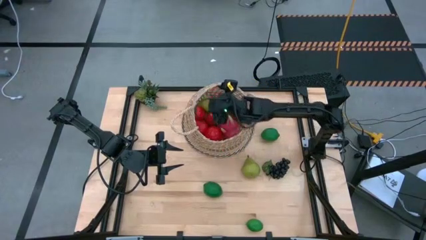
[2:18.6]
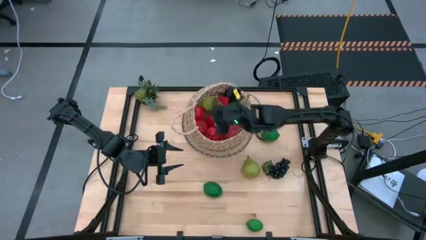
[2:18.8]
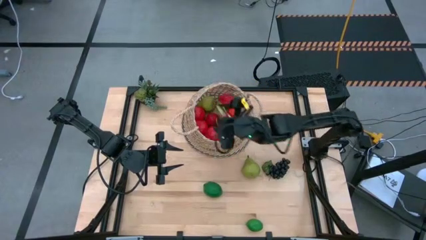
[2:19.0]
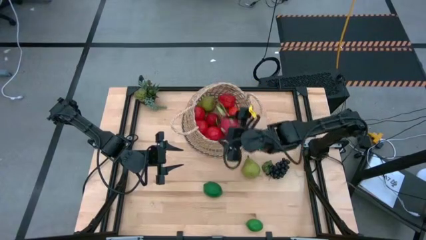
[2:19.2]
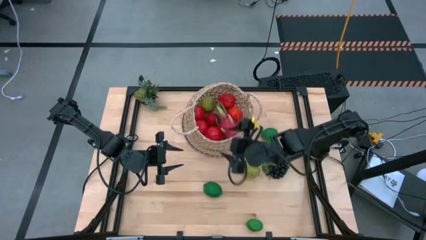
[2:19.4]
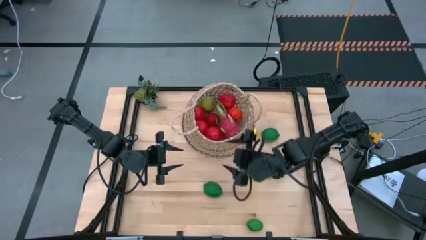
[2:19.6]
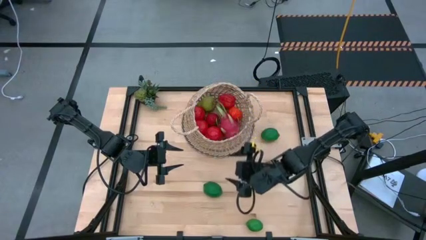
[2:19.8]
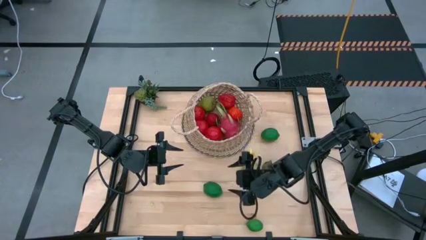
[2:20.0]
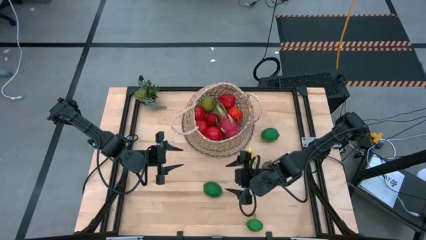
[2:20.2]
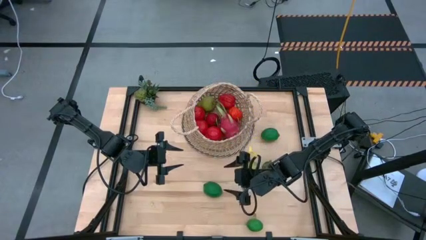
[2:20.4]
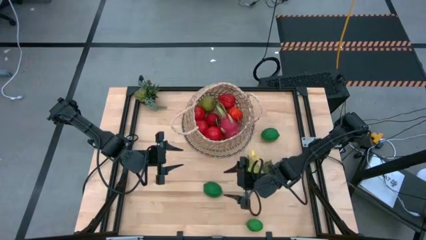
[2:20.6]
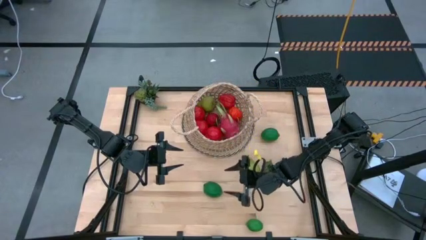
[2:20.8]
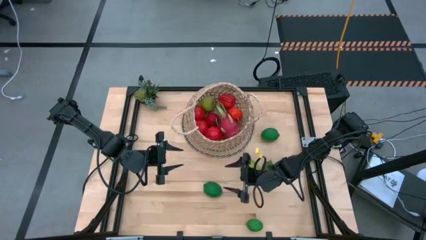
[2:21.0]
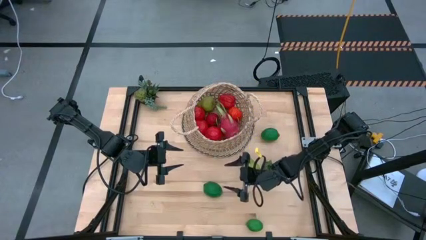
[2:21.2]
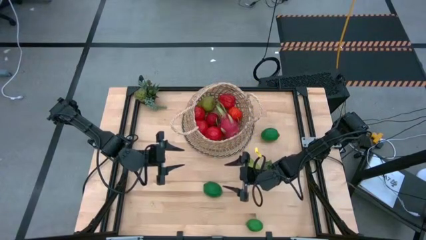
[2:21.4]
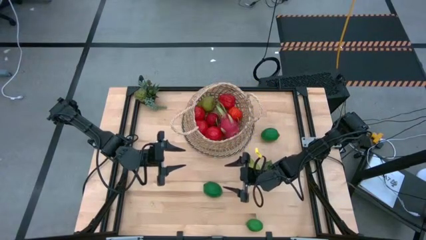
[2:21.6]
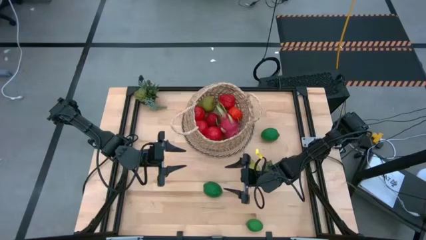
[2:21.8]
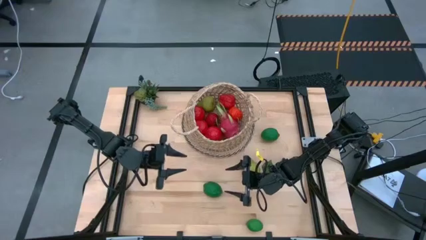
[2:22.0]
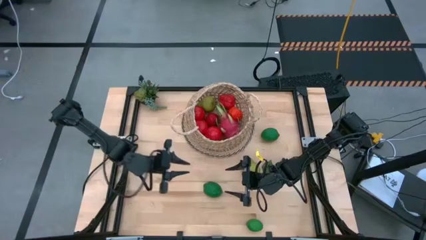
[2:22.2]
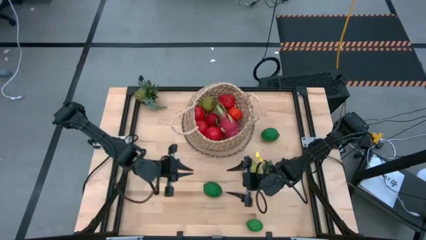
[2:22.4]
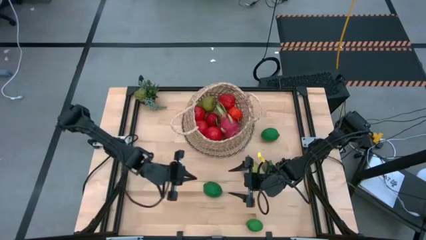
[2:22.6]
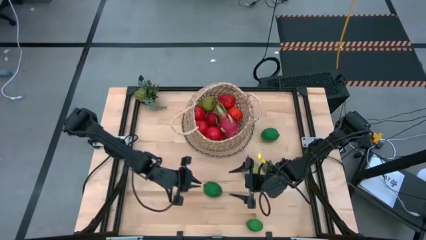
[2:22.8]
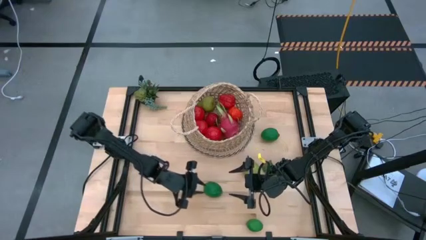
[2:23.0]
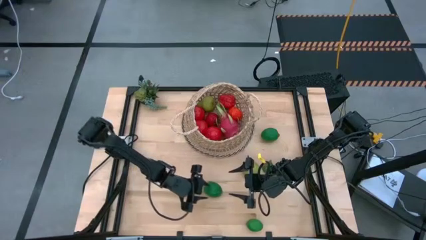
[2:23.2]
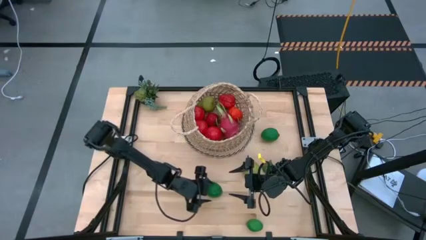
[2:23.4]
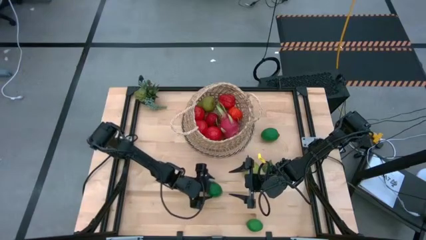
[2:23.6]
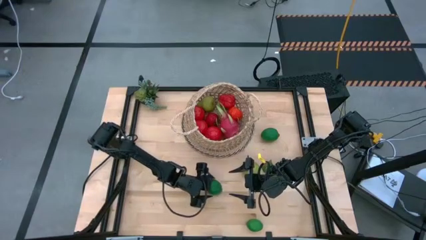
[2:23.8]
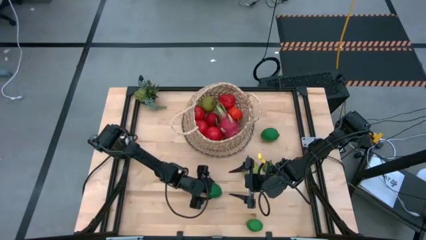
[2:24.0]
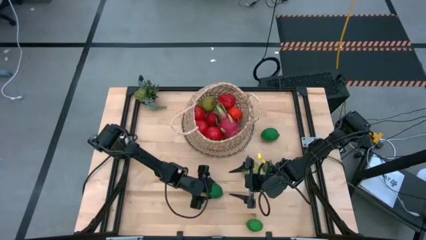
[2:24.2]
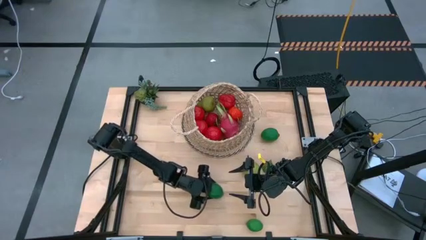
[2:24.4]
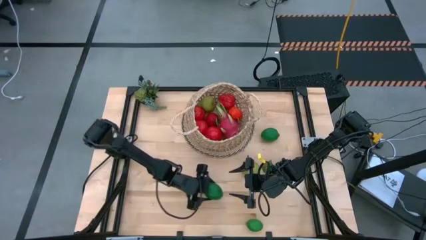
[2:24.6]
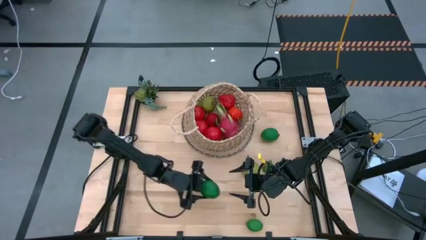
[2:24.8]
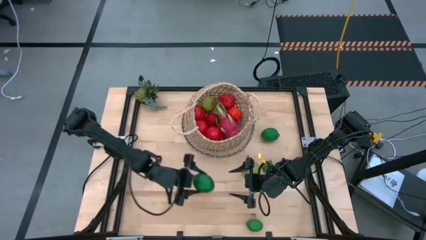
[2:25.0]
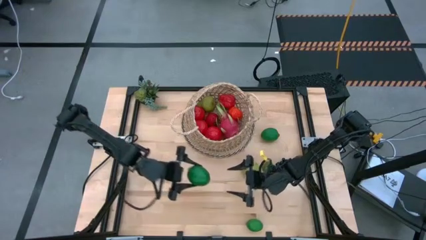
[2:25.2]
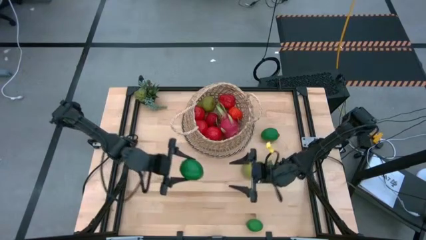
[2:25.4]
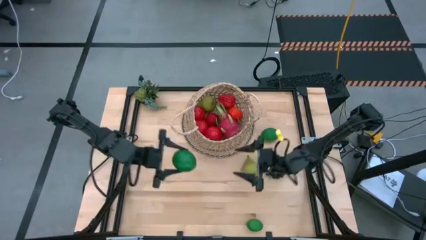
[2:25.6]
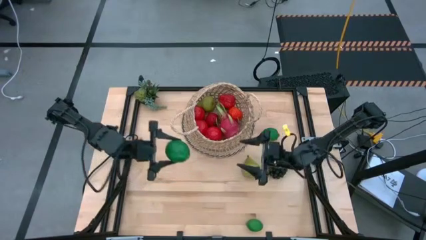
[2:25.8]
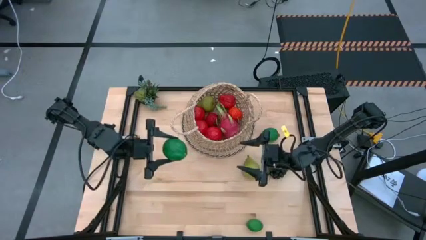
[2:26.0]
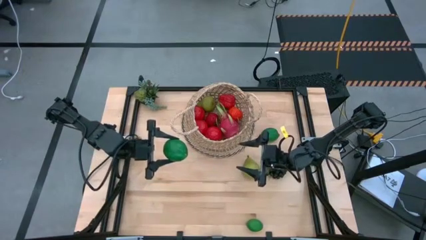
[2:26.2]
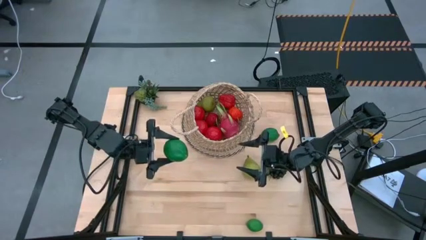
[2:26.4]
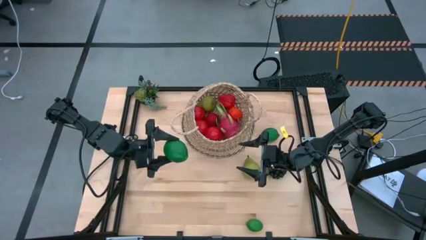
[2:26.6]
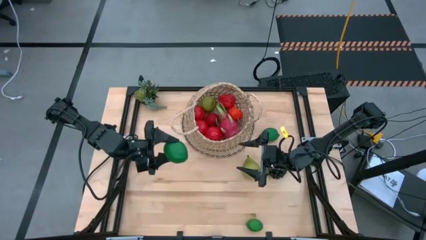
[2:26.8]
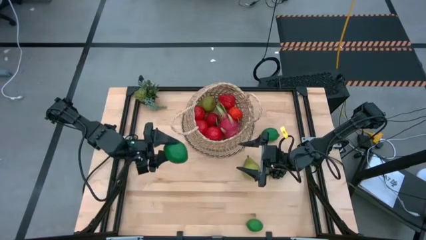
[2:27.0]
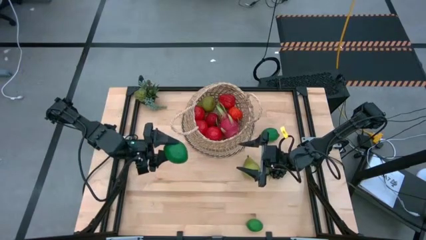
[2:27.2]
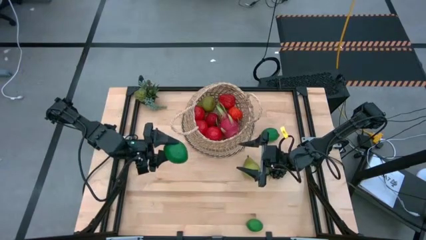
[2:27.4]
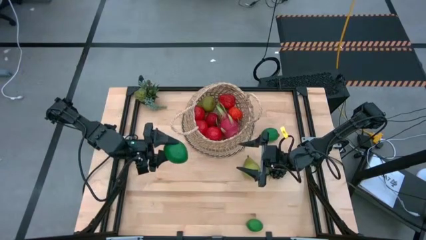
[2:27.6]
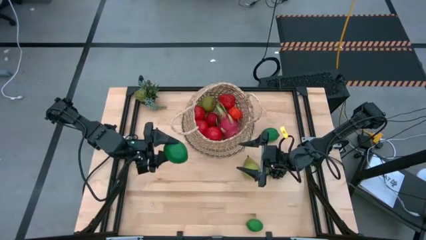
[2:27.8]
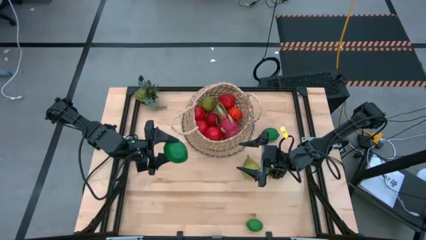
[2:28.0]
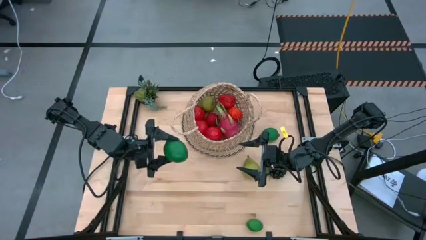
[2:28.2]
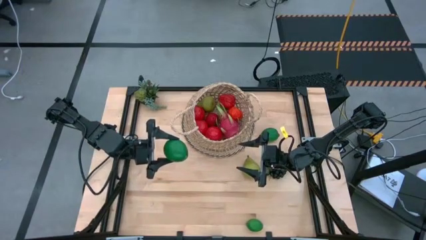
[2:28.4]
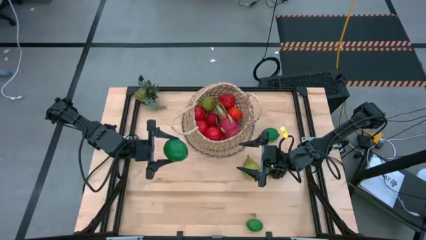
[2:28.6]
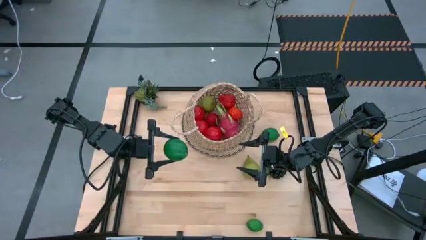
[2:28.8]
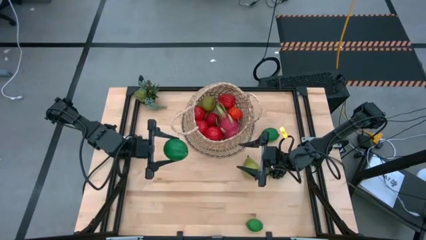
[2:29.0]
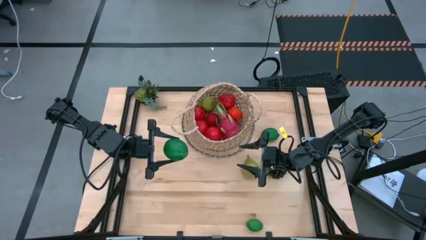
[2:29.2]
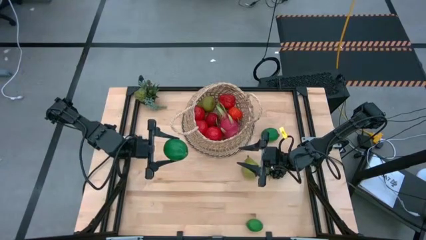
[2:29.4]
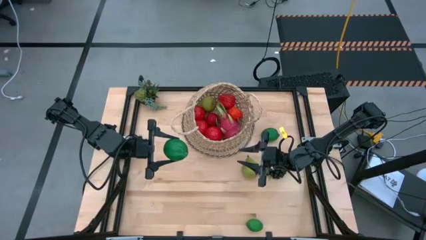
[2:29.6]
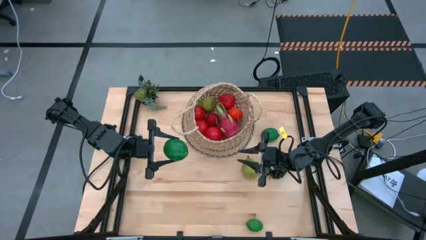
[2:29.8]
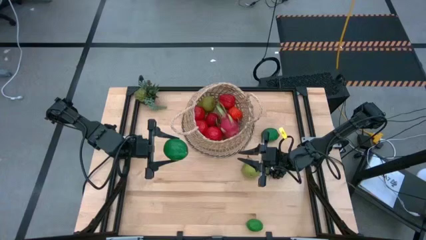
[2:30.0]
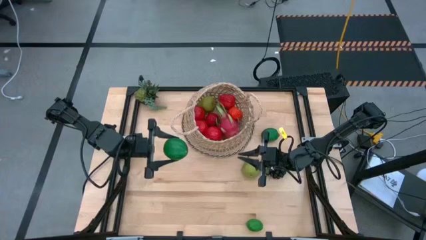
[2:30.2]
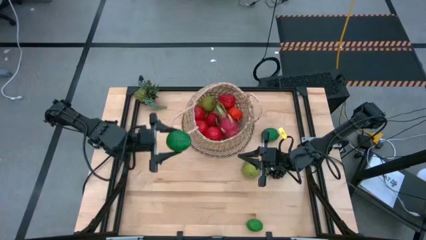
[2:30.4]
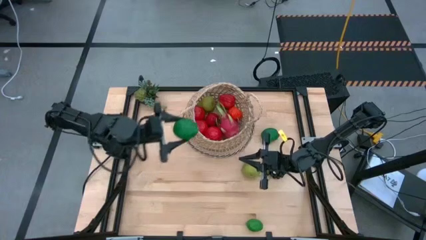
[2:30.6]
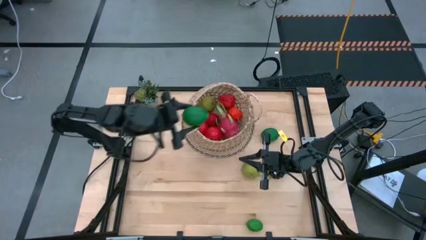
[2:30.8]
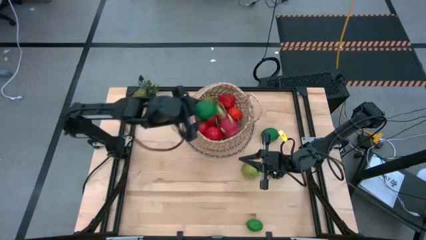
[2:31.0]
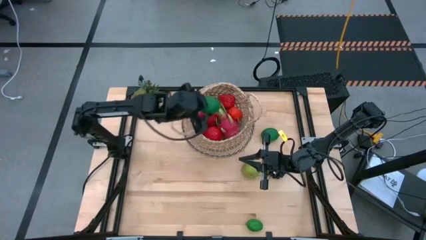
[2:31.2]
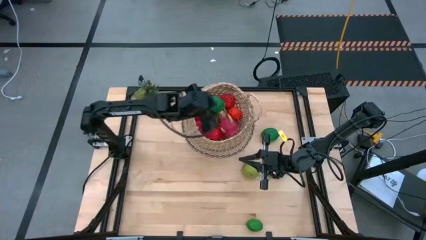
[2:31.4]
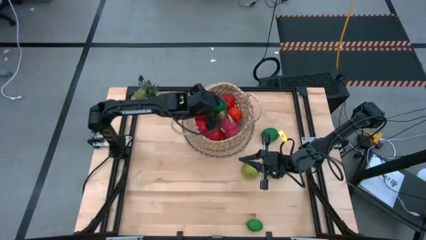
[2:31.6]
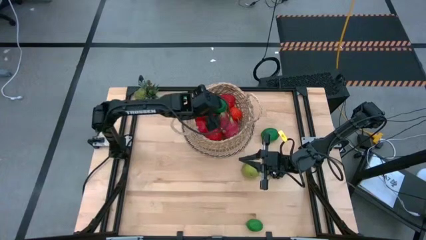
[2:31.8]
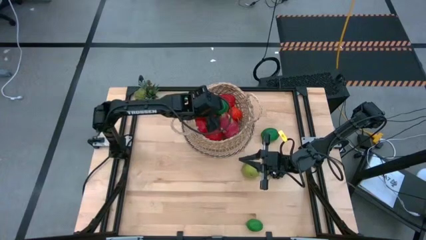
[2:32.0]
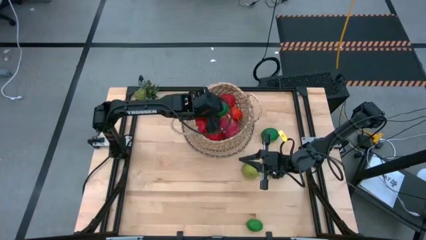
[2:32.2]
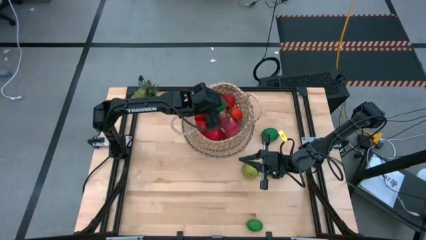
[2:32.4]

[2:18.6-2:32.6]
Task: Build produce basket
Put the middle green lime into the basket
